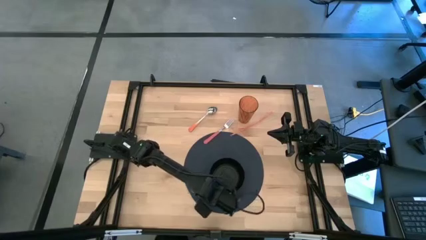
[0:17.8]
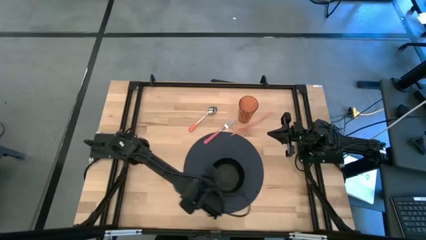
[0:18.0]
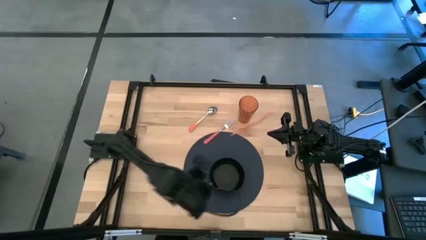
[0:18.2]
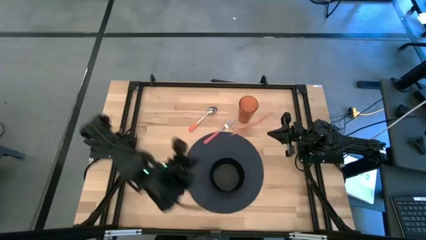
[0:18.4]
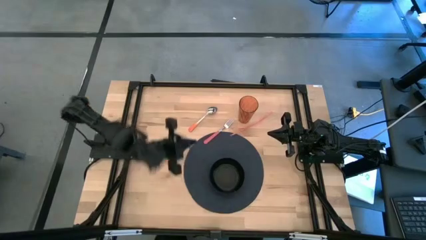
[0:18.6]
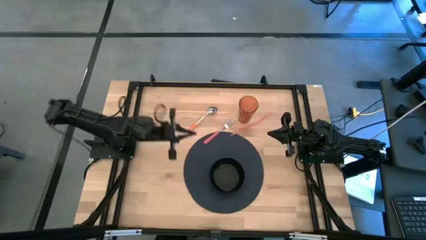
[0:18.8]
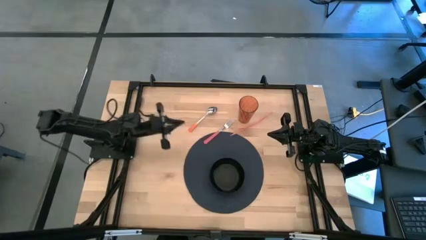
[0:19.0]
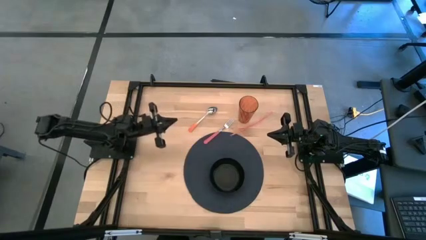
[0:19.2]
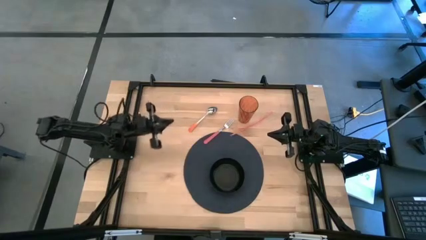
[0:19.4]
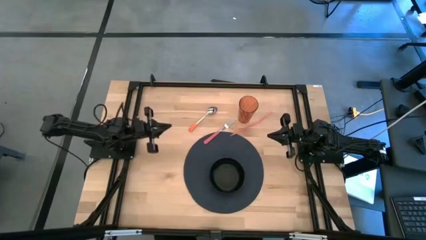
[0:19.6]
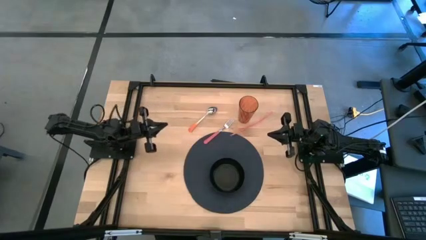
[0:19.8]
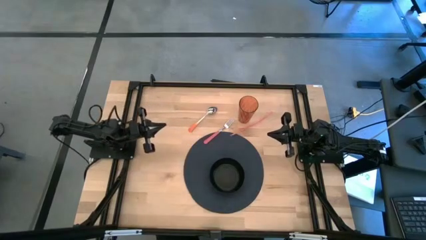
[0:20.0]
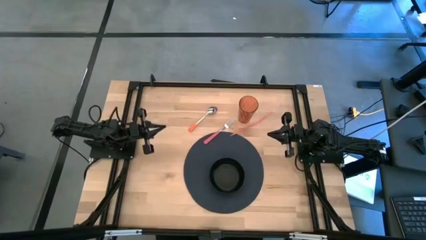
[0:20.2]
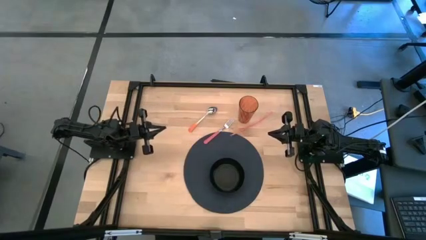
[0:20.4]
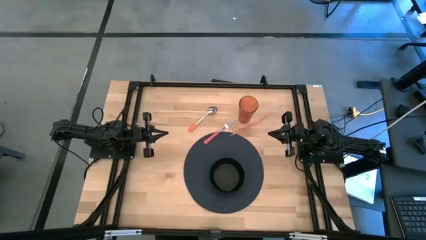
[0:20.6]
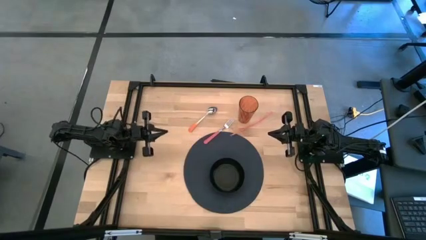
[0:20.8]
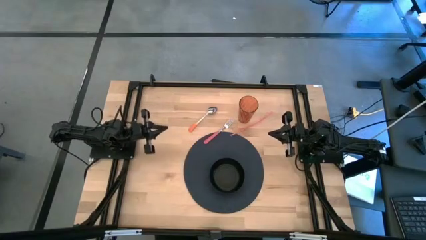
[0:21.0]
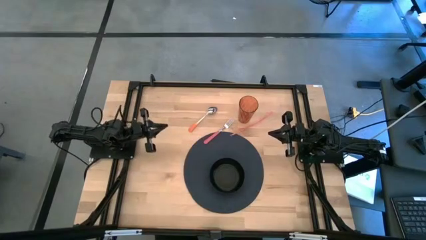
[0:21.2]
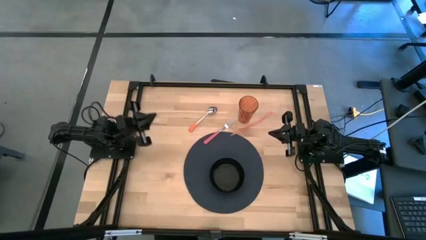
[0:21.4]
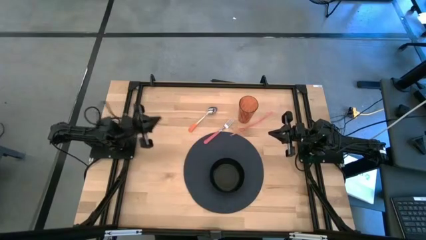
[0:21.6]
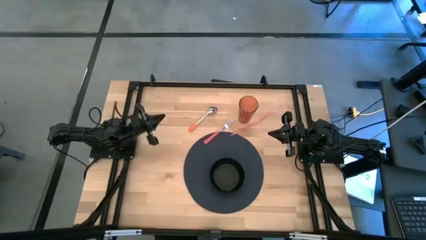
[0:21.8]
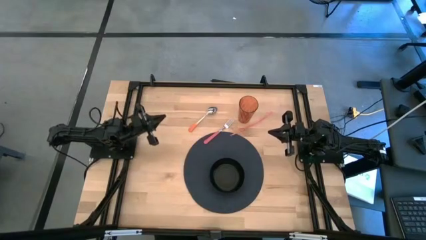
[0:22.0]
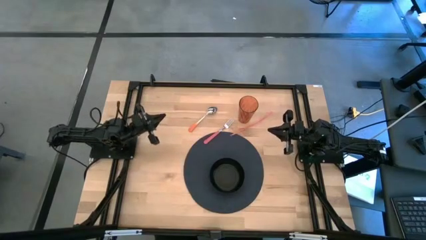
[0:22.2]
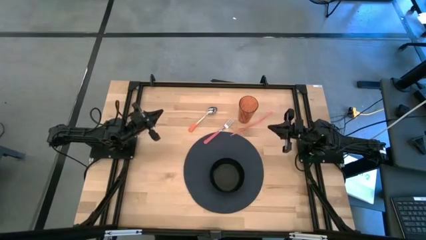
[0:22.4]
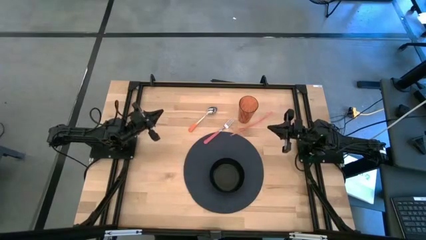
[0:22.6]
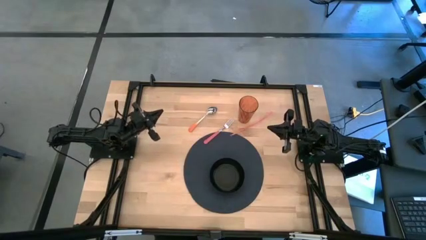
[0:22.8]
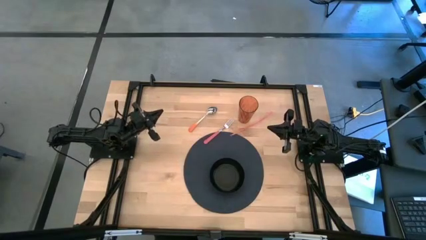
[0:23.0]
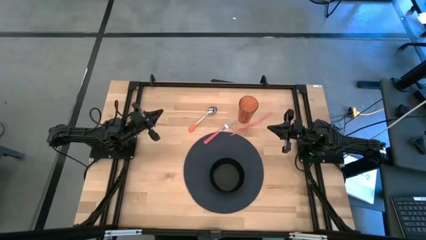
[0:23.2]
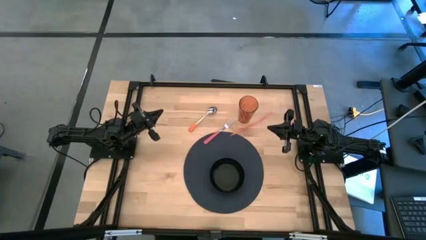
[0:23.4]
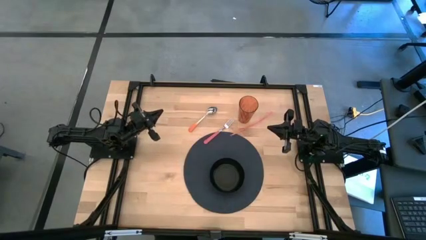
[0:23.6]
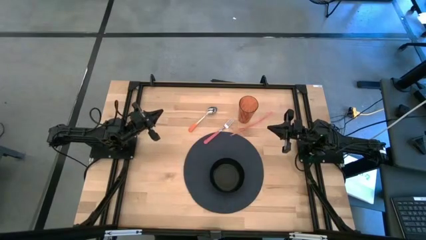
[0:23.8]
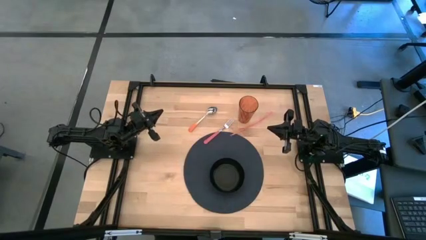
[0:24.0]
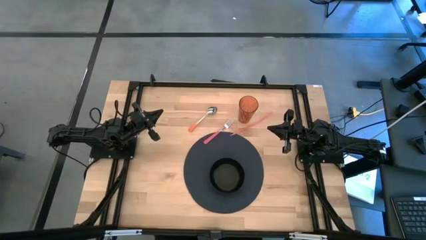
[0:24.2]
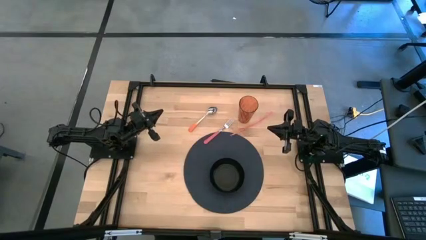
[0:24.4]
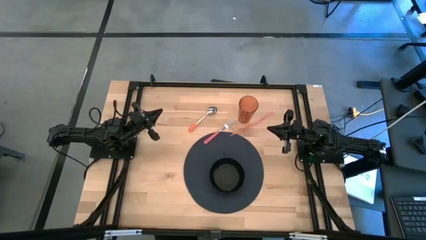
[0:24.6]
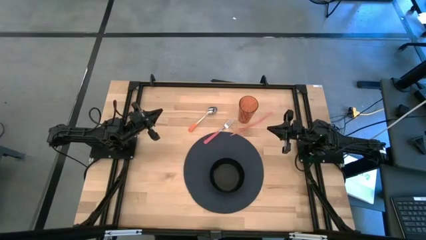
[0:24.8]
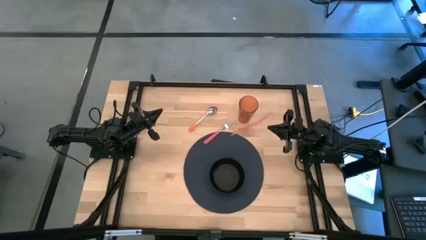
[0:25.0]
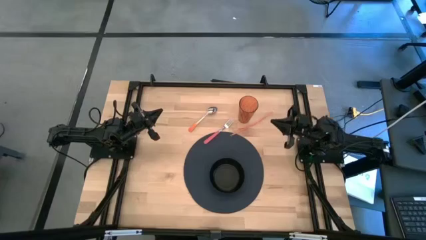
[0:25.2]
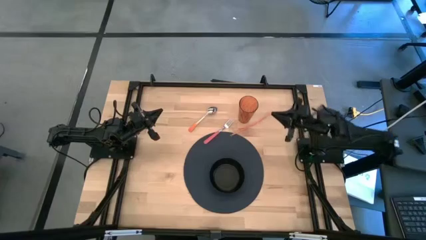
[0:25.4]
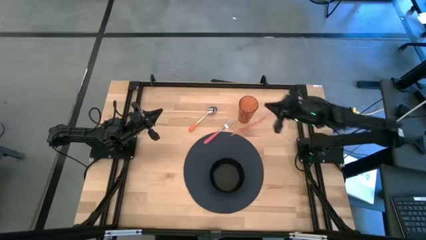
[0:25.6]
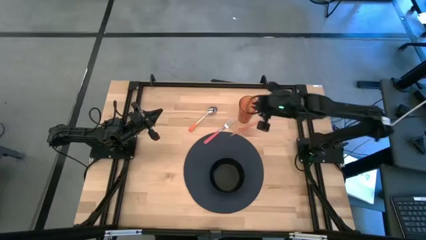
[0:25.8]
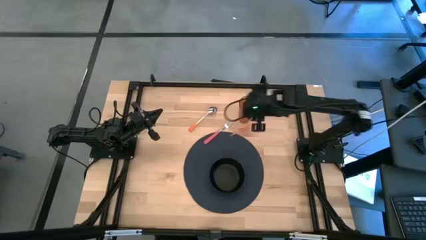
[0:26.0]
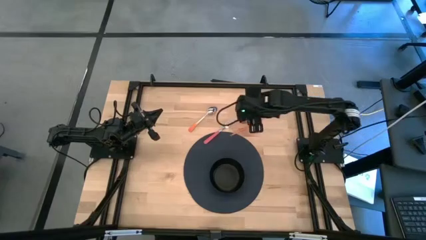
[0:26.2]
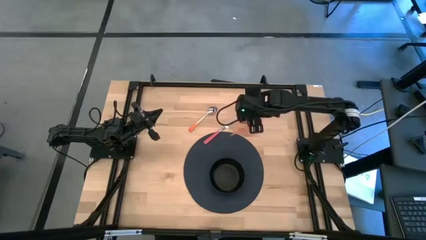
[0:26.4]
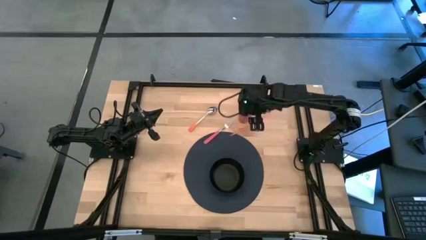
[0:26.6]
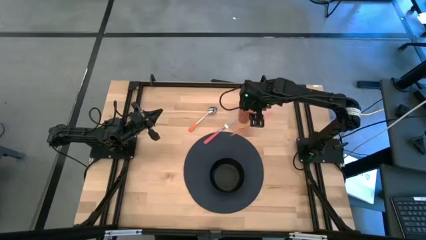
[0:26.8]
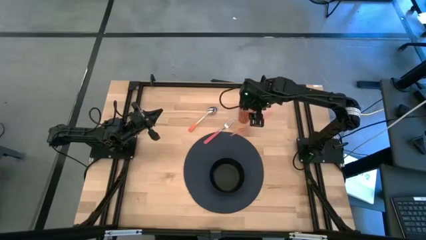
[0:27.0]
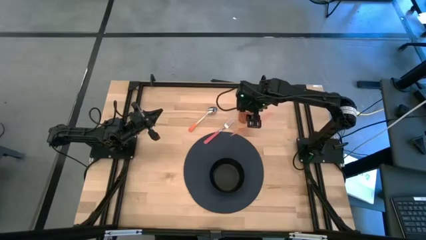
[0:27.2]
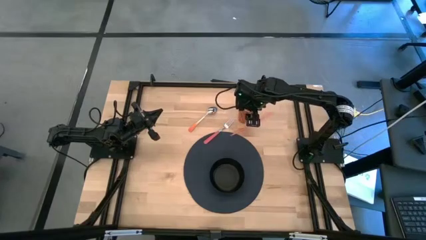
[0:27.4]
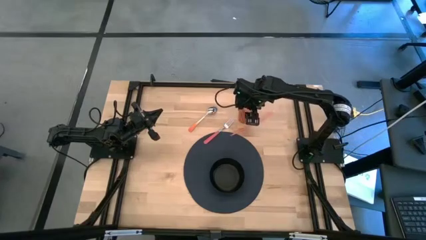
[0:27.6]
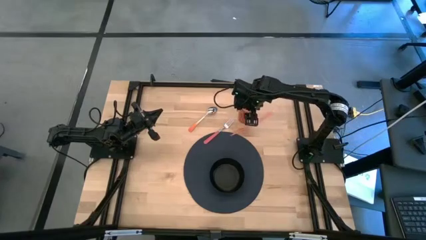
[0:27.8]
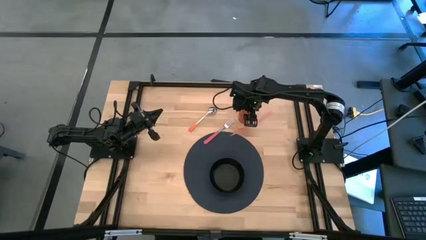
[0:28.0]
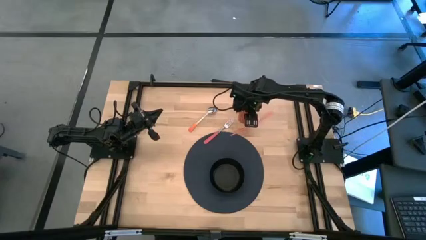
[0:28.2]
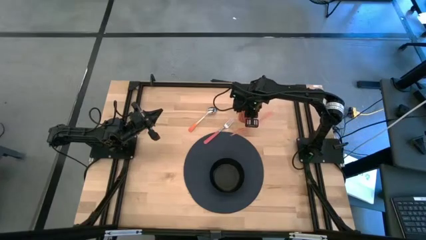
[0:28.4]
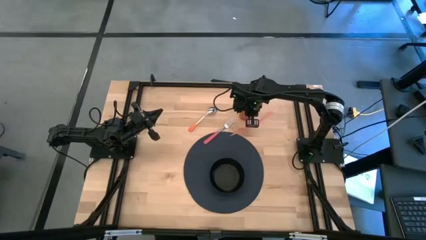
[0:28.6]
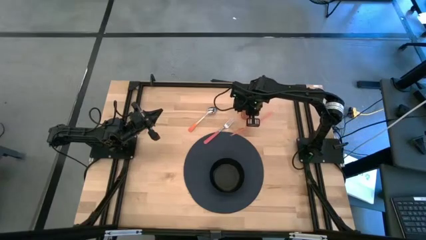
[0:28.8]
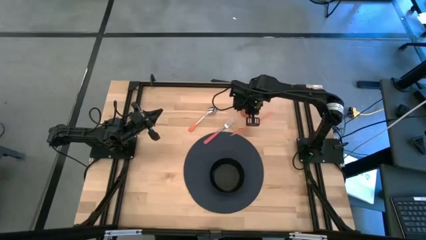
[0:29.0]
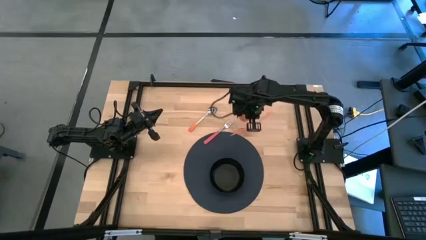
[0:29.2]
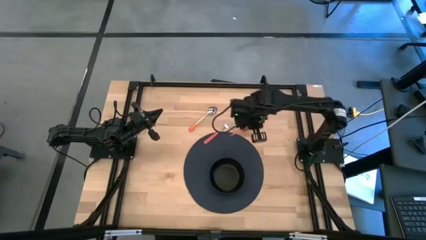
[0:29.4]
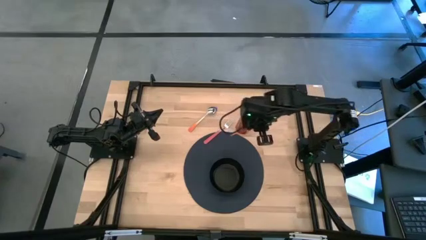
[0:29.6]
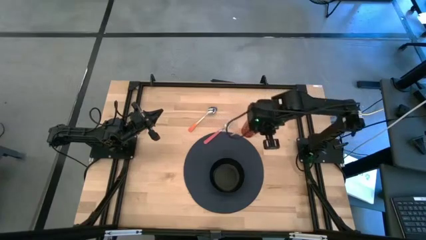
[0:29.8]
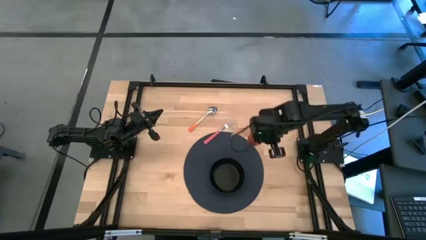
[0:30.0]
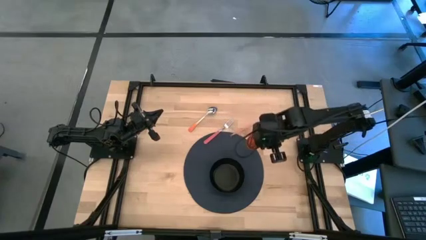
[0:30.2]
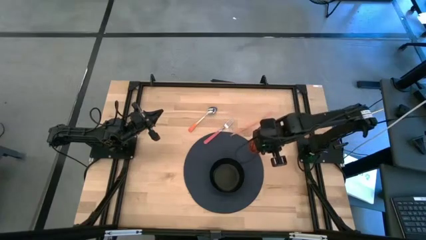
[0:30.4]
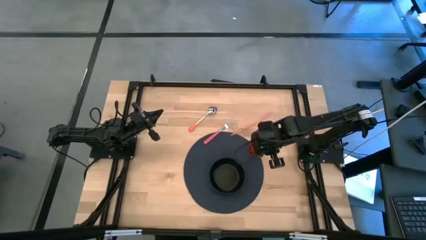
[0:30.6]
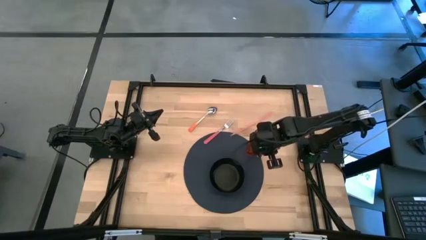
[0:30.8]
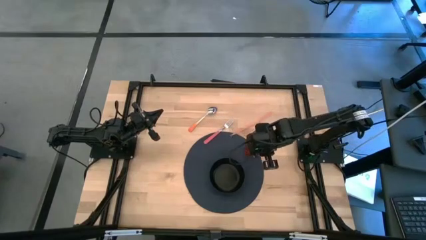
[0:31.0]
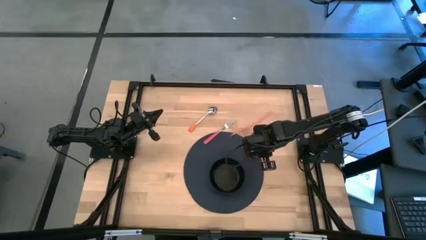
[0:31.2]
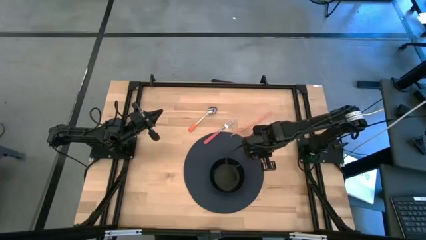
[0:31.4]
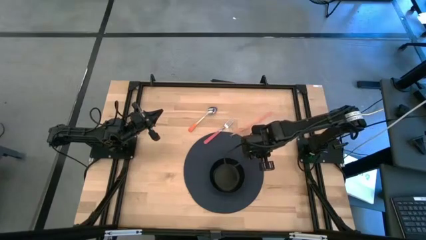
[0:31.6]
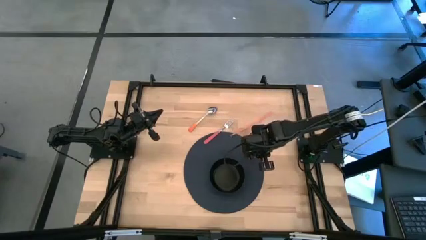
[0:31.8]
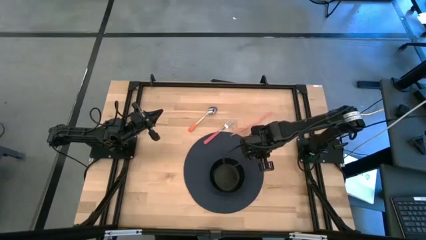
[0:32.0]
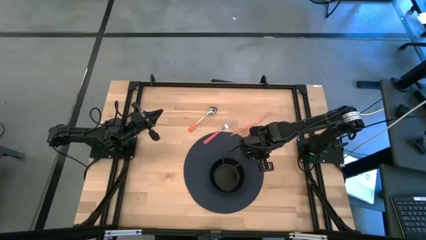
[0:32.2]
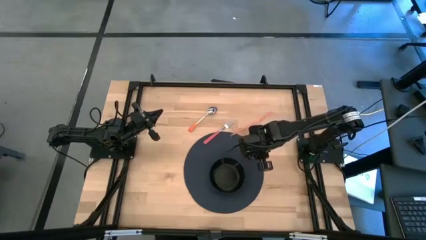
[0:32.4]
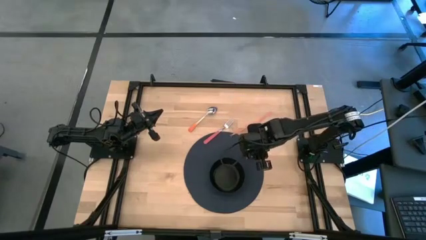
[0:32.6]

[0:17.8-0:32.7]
Task: Pick & Place Utensil
Put the orange glass on the blue mat to the top right of the black bowl
